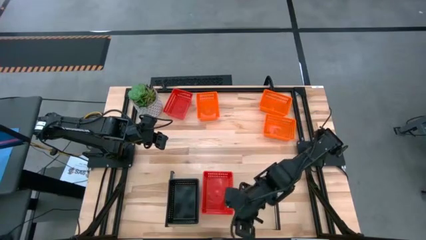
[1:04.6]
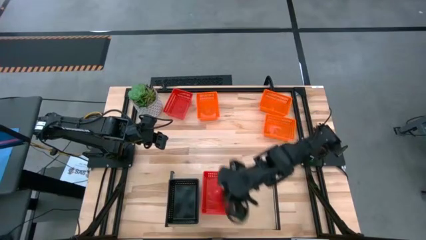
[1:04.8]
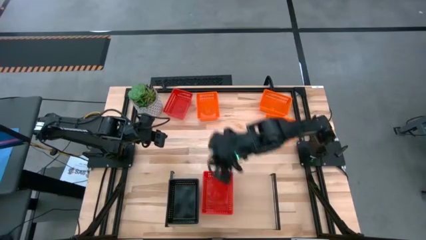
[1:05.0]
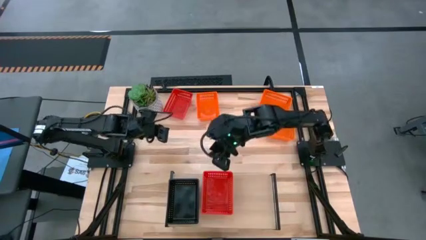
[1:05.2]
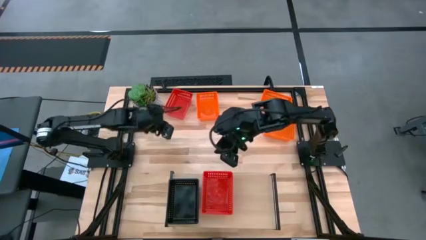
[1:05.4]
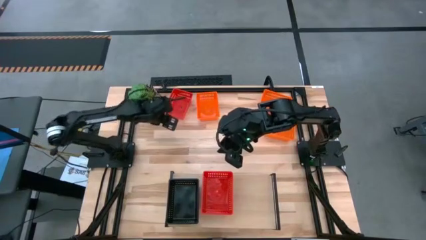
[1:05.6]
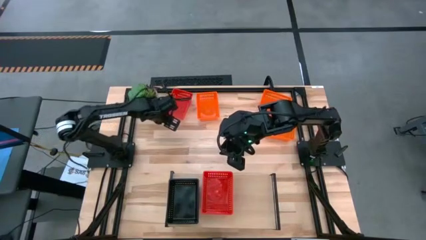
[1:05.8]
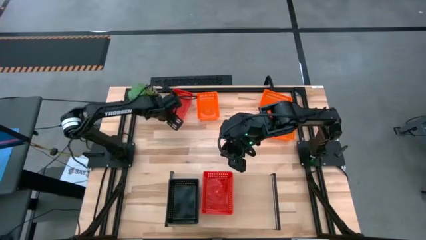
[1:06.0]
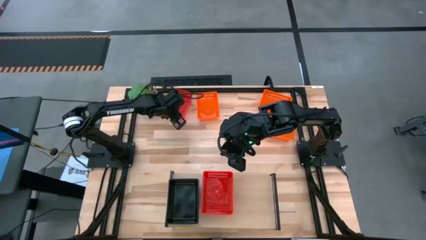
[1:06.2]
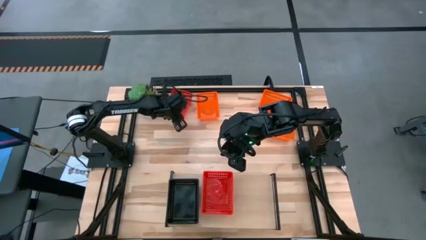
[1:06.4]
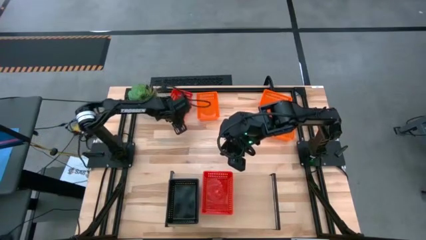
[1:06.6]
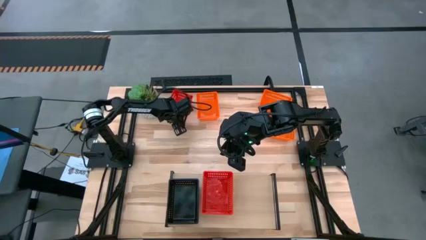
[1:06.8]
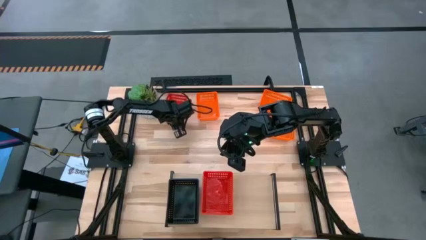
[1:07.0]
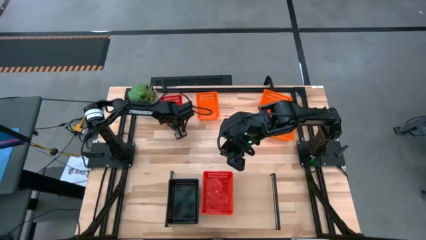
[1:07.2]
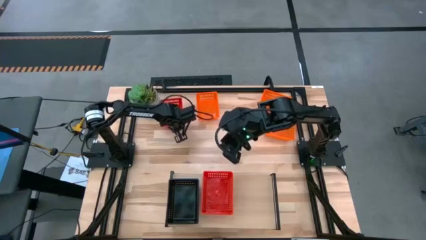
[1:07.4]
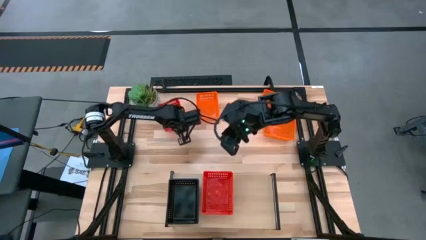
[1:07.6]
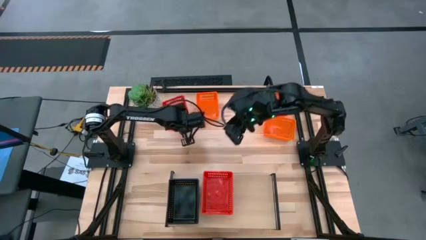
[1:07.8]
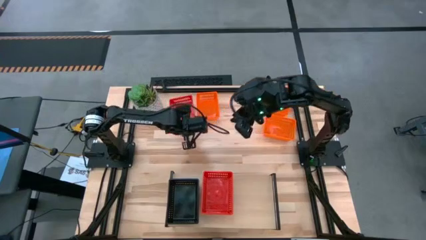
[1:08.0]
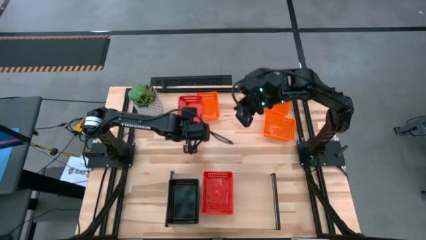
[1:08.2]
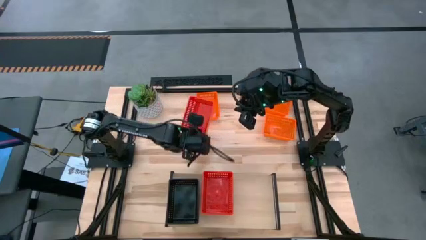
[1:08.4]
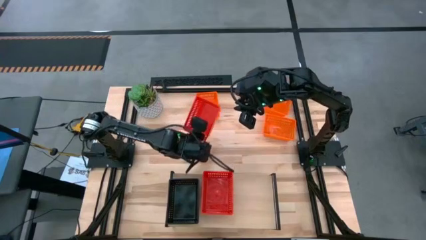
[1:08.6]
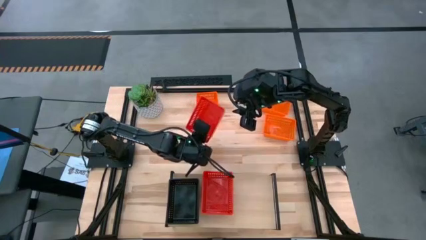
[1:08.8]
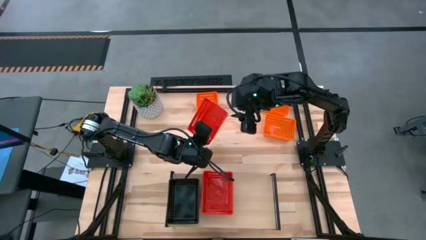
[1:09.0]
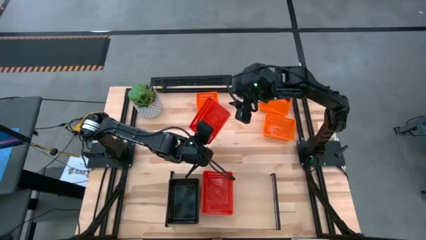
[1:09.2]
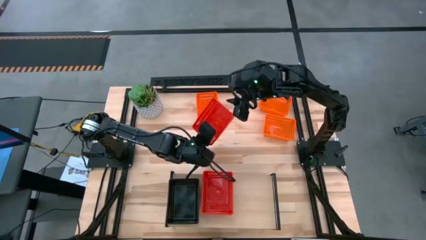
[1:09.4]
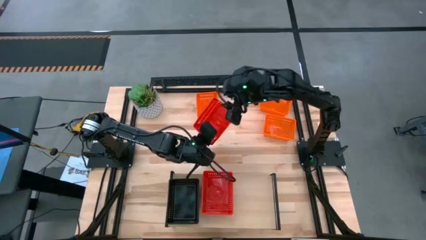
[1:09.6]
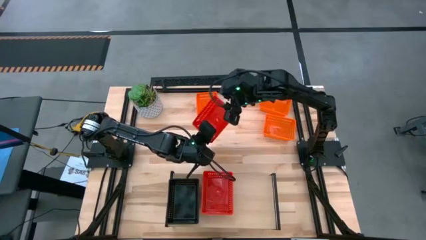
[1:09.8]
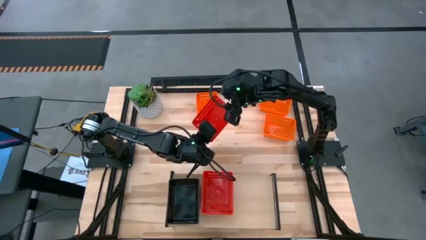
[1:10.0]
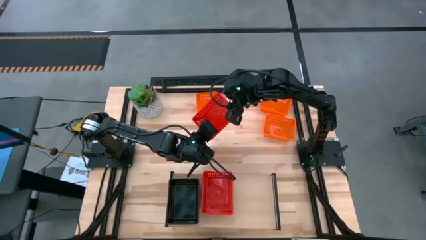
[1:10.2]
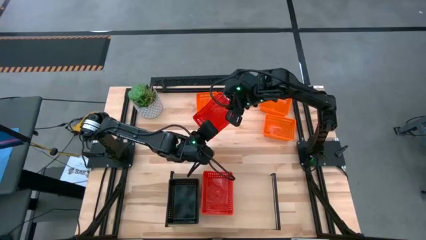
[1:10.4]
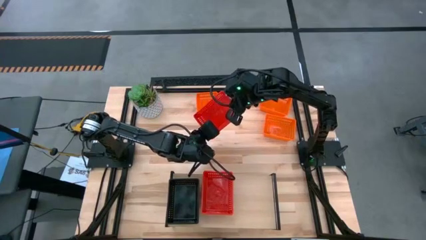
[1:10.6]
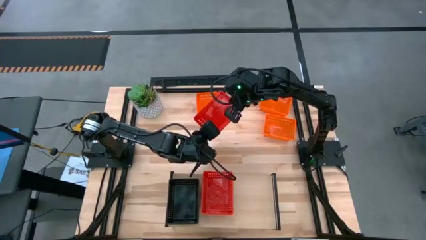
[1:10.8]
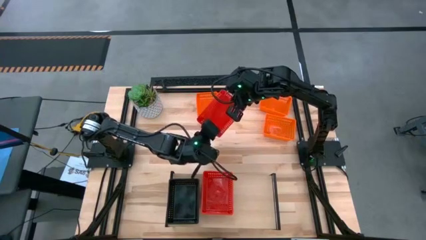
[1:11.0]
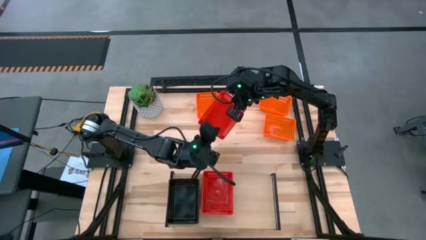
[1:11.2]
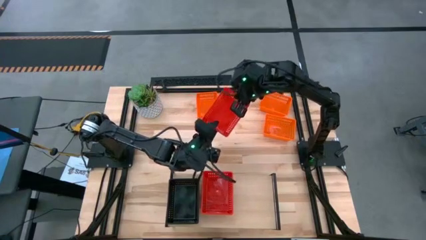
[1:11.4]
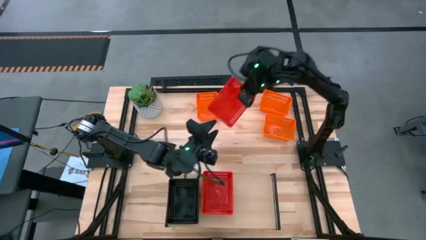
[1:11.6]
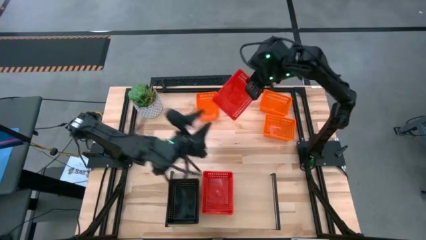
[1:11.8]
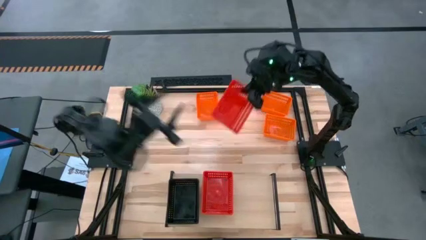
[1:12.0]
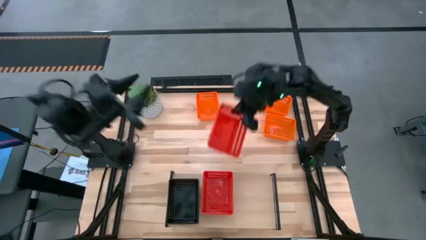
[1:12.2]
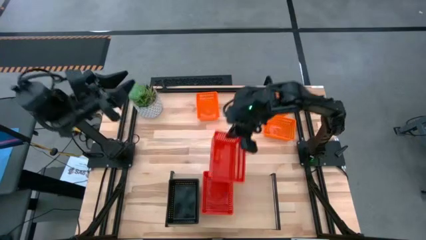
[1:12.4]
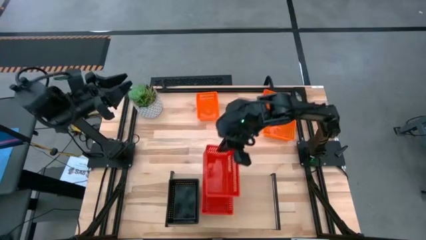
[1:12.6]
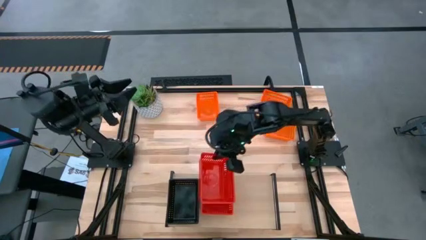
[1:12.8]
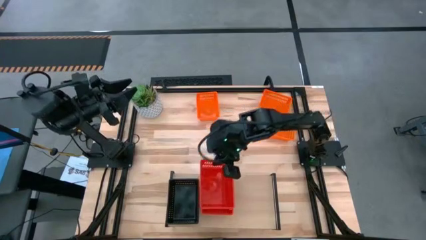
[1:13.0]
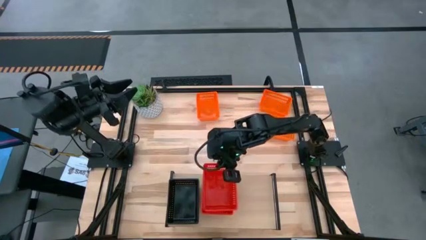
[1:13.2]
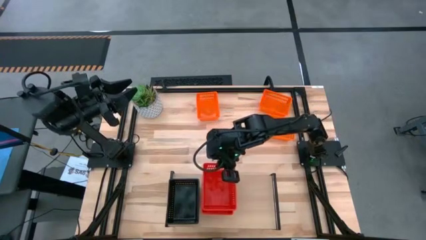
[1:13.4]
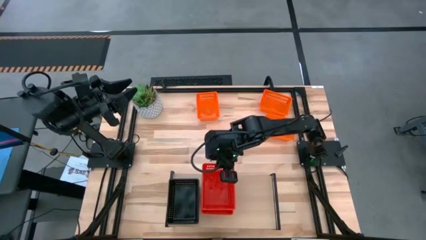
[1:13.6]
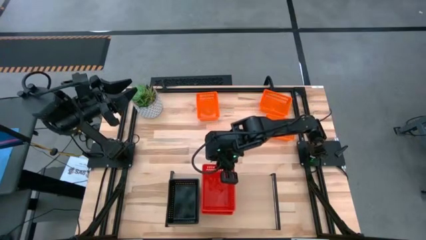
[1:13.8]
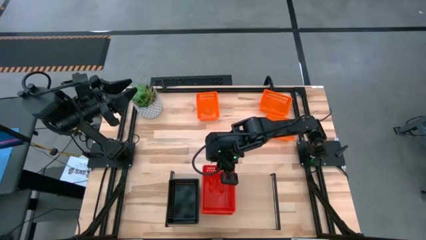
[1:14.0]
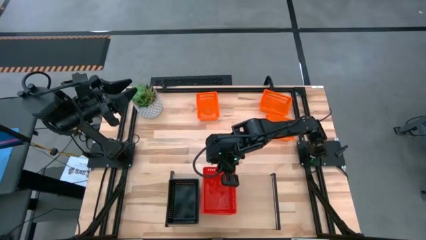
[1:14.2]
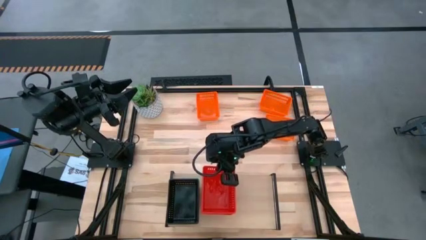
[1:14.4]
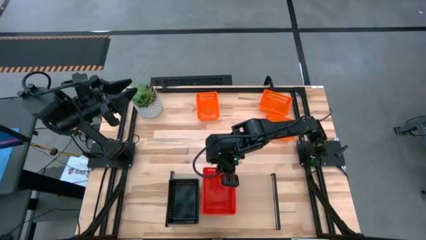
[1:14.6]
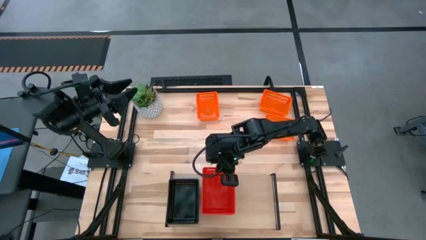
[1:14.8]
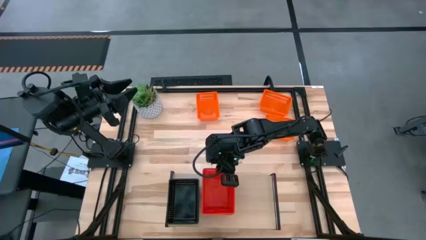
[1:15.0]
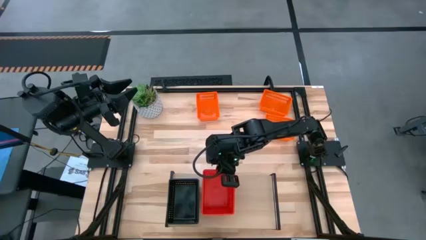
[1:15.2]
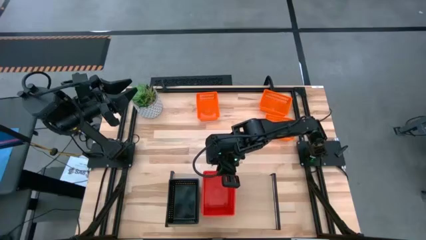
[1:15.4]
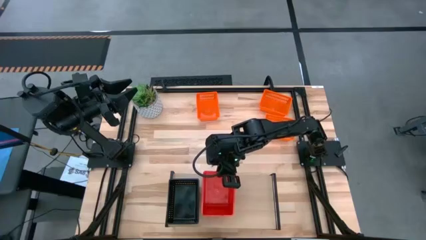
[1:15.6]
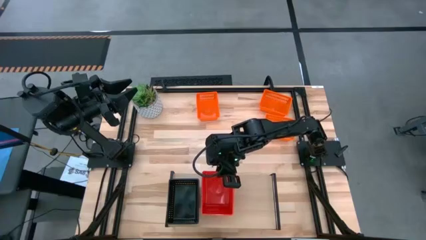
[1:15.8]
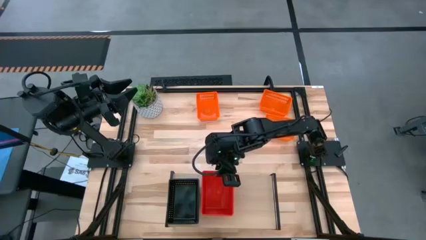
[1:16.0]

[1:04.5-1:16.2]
Task: Stack baskets on shelf by color
Stack the red bin on the top of the red bins on the shelf

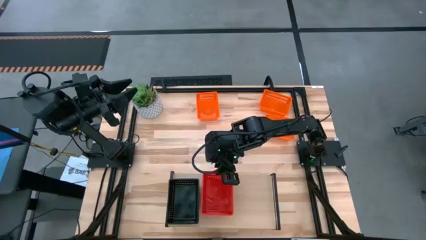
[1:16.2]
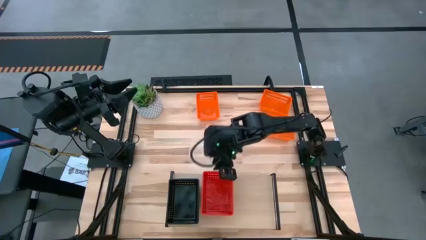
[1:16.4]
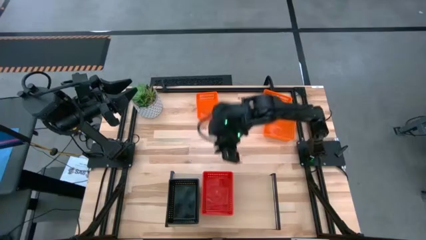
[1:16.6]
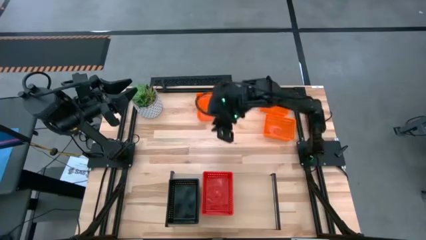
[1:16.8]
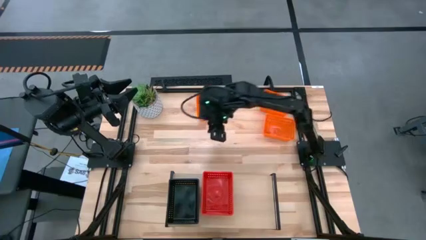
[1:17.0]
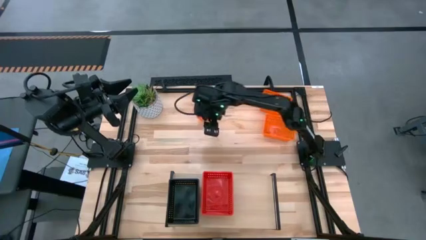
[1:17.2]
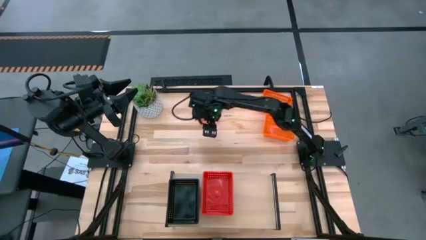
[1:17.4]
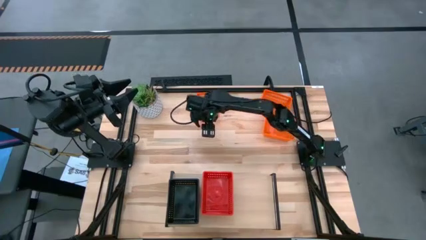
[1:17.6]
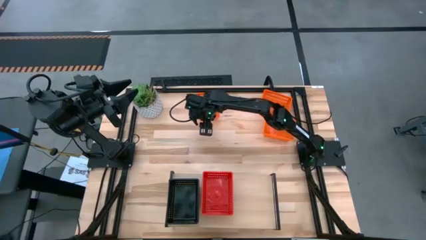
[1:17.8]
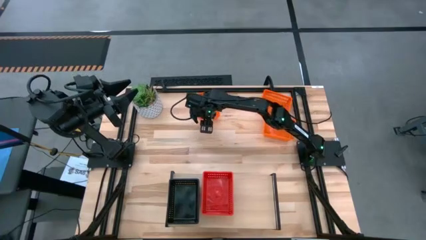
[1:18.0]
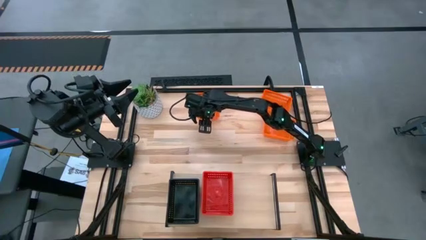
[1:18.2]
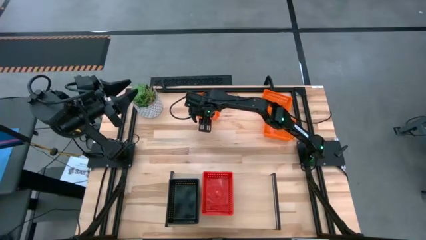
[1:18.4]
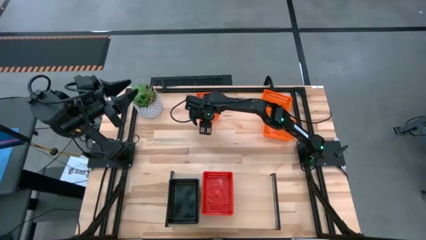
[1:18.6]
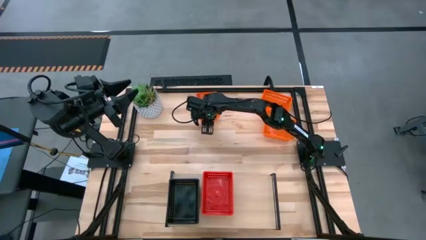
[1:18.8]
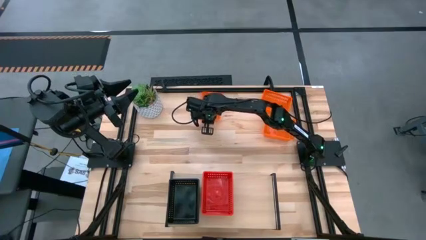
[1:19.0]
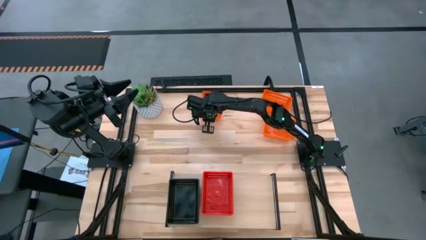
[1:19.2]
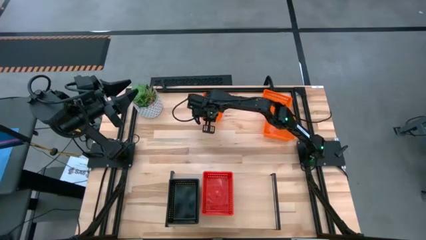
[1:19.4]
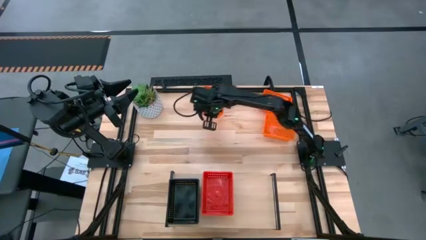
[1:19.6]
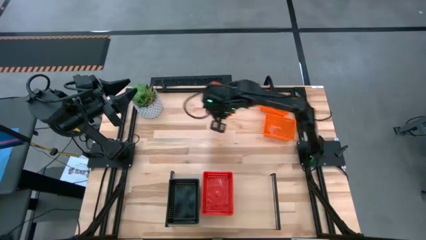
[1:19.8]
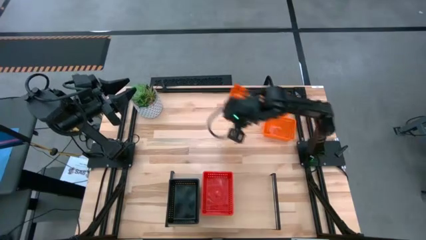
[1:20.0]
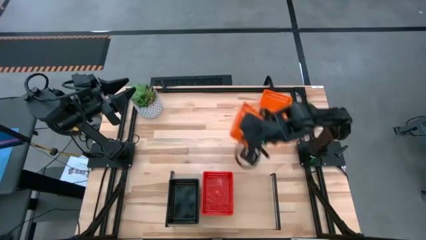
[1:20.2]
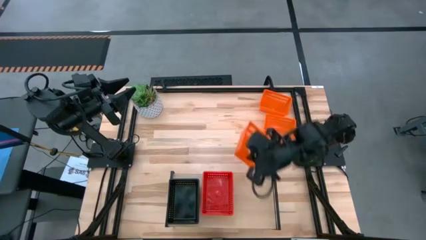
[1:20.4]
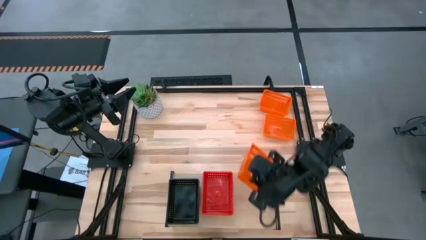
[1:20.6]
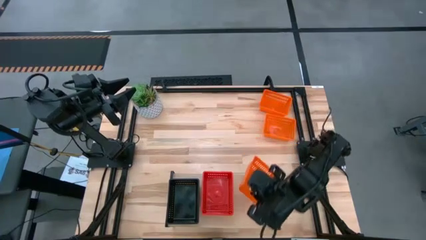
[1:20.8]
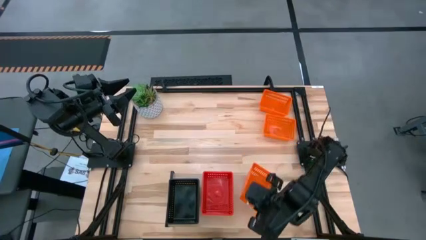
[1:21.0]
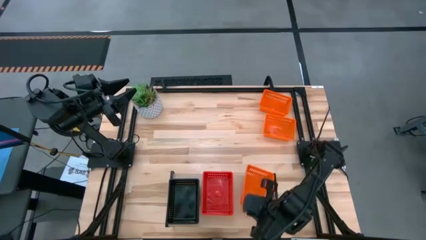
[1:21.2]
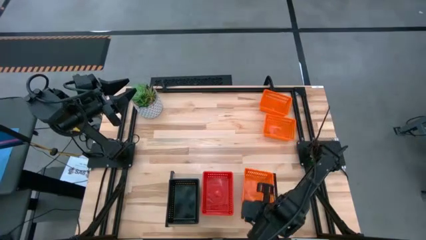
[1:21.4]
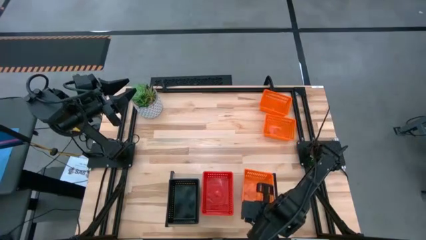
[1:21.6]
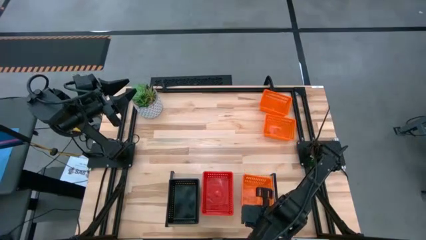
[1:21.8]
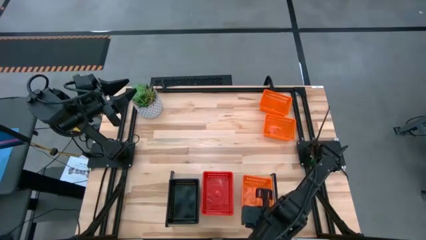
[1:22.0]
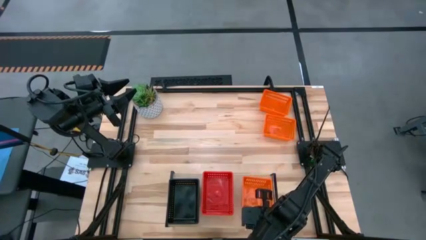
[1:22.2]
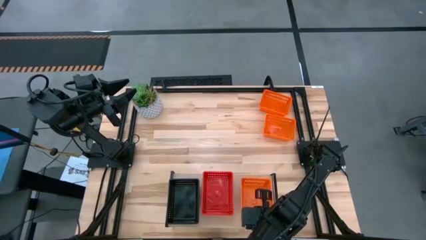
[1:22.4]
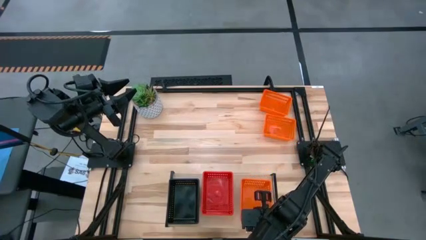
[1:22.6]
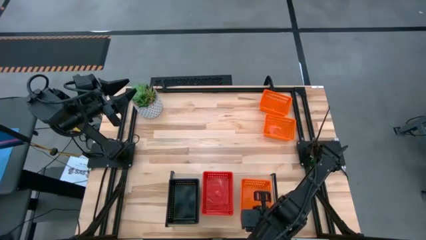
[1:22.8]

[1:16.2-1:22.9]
Put the top left orange bin on the shelf
